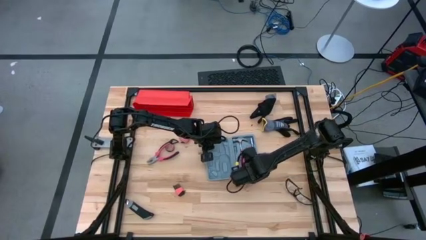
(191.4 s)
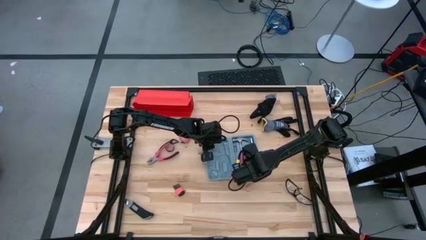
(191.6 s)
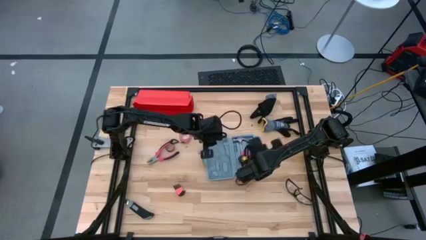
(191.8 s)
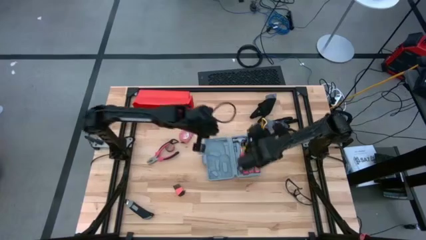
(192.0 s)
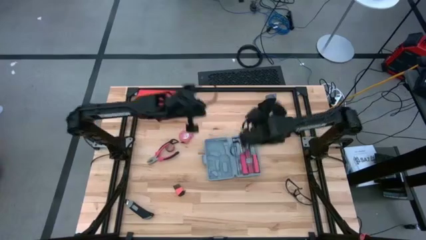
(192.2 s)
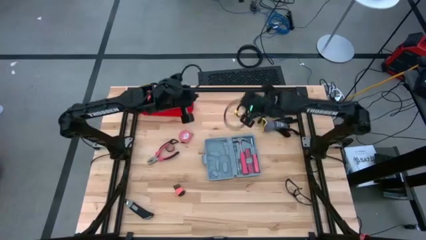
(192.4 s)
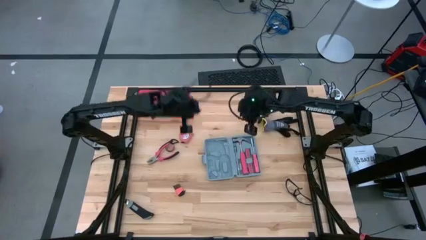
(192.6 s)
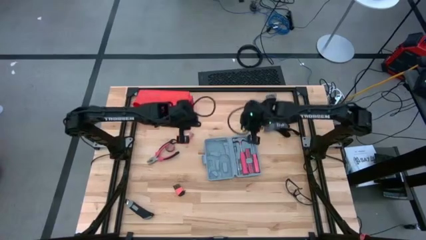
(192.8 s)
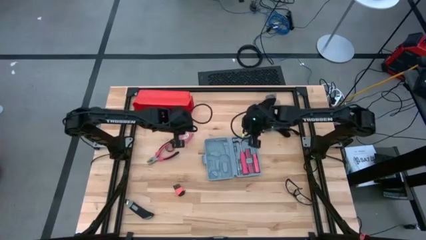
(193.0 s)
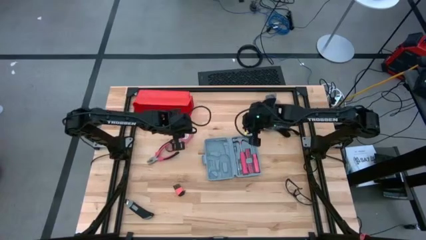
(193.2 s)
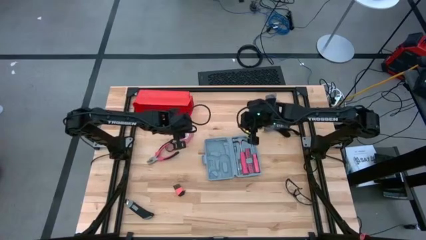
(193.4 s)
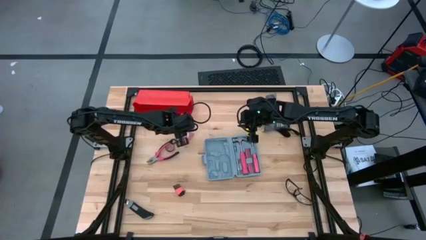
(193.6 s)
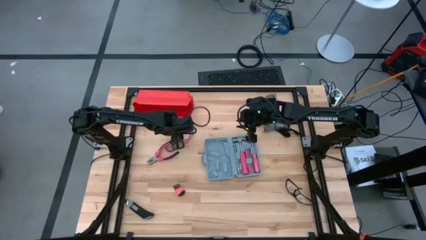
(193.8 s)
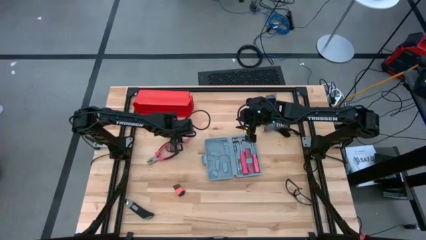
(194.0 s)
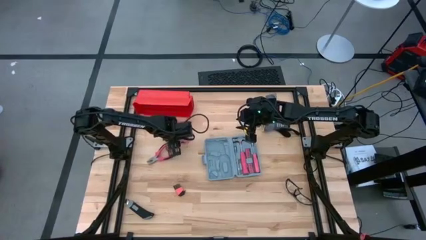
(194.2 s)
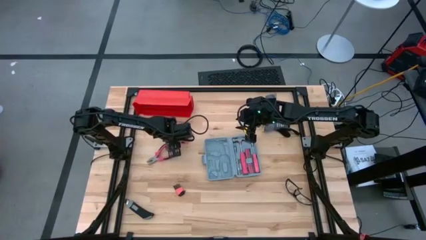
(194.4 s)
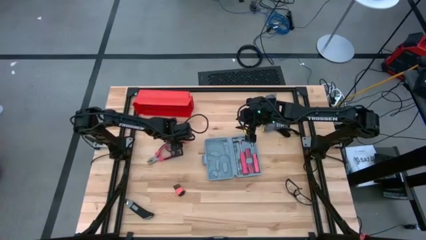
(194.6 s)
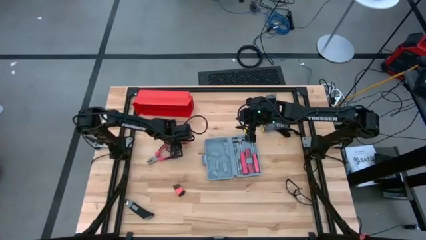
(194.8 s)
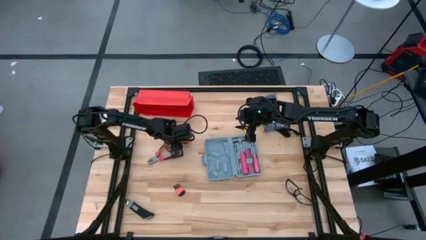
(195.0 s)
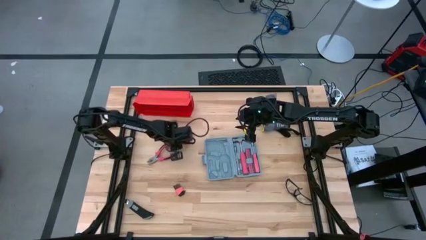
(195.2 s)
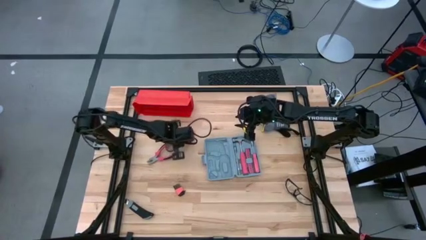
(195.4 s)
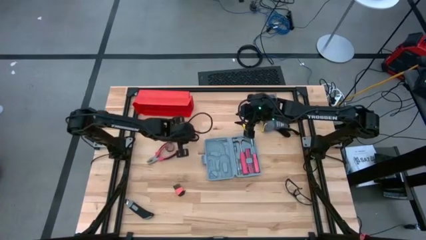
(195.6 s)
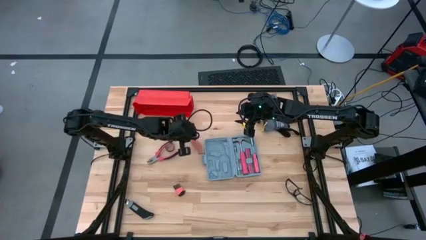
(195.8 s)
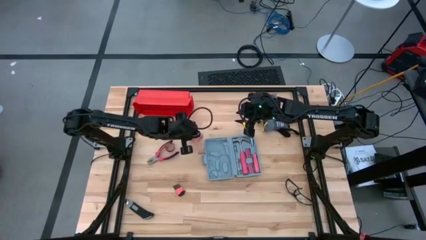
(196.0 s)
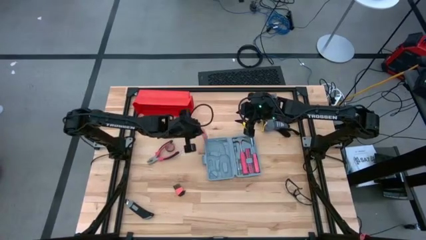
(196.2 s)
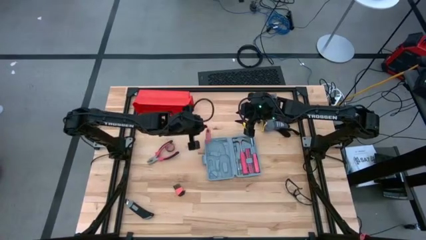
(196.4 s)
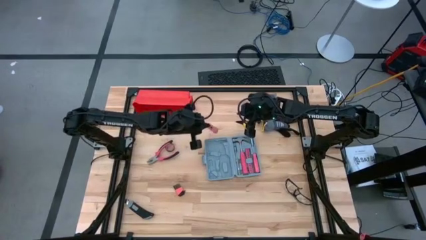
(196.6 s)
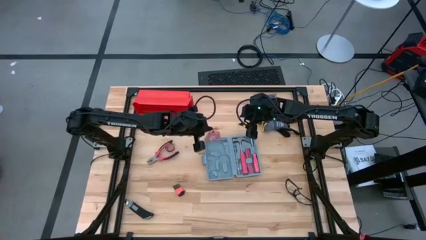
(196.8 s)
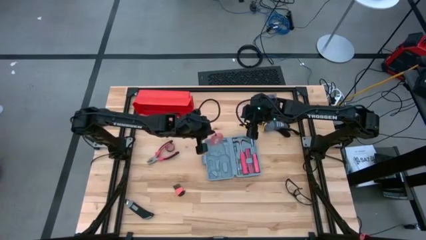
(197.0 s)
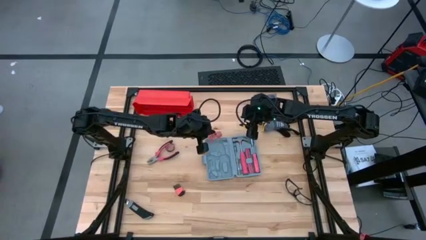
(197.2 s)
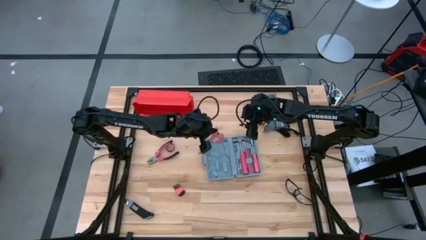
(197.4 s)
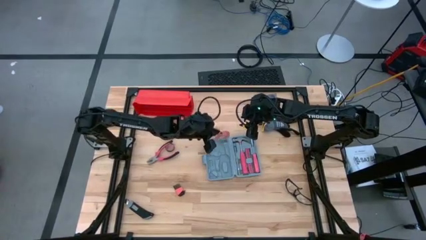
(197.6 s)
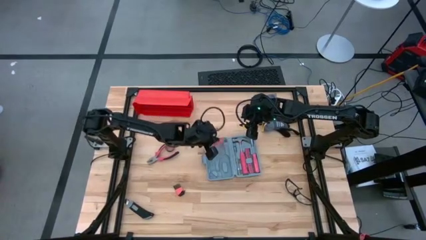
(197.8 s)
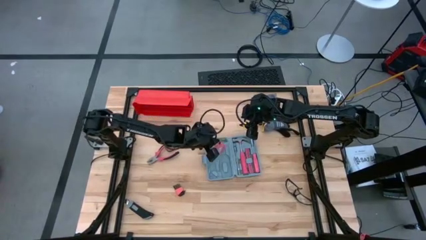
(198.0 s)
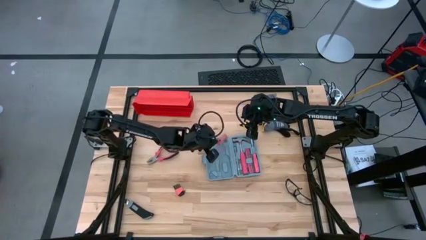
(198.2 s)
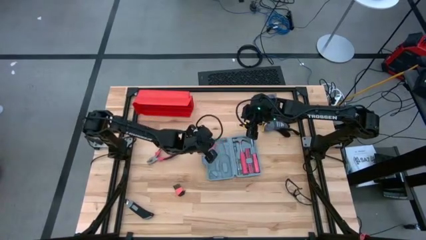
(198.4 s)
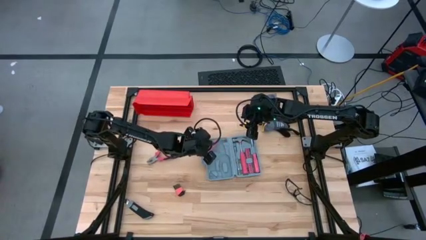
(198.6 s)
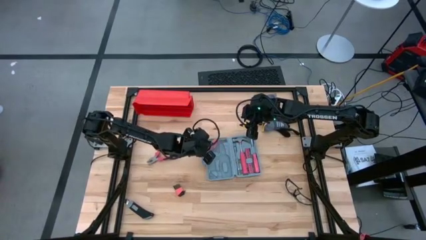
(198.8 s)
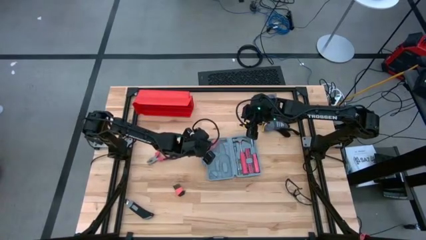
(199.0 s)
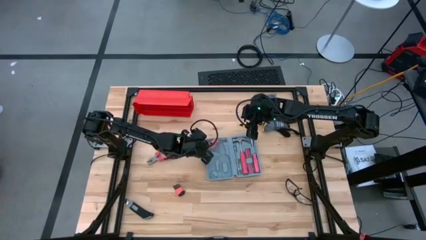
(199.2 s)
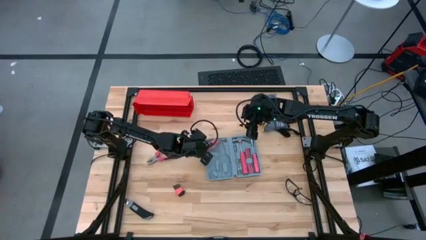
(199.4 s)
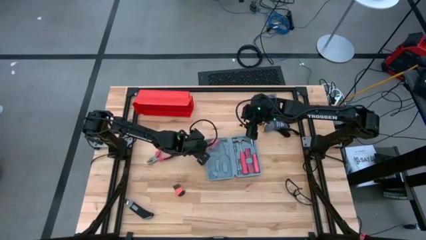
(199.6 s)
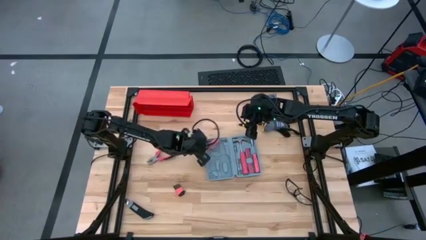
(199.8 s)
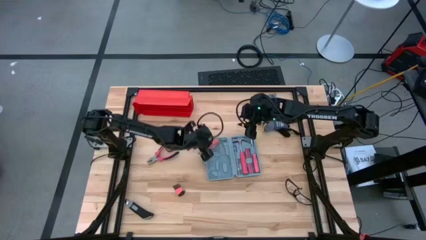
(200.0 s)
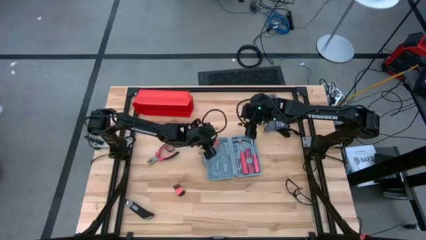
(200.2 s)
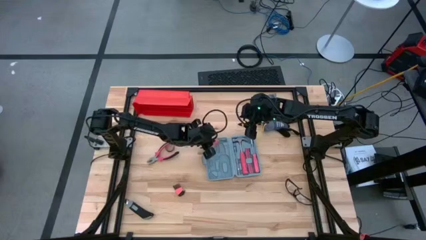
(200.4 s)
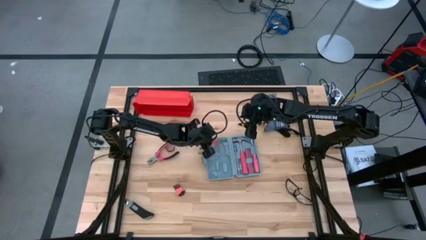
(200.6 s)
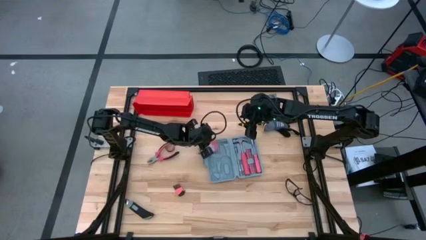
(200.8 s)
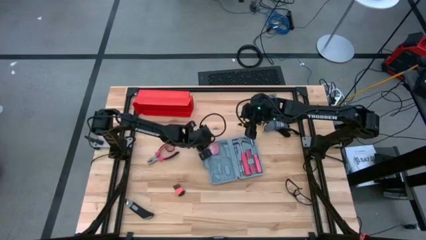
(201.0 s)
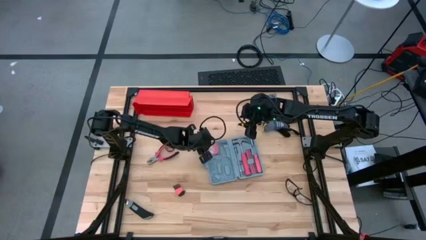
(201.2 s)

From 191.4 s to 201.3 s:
Task: prefit tool cases
Put the orange measuring tape into the gray pre-fit tool case

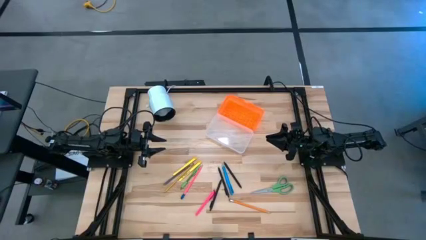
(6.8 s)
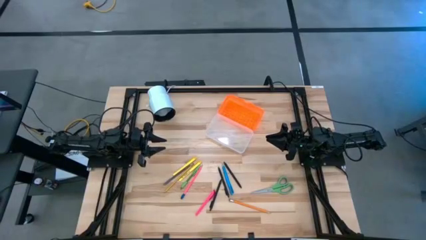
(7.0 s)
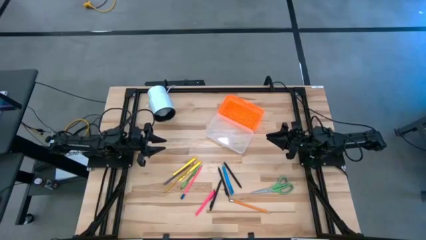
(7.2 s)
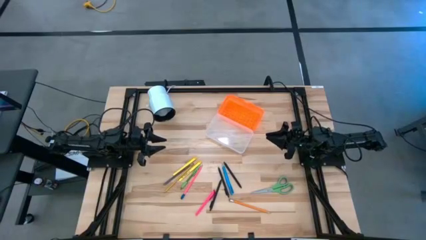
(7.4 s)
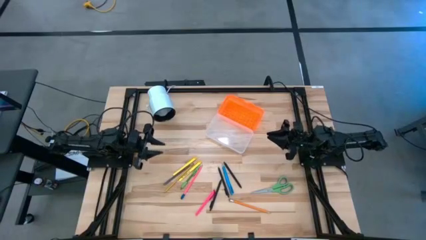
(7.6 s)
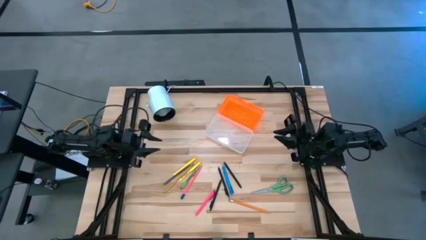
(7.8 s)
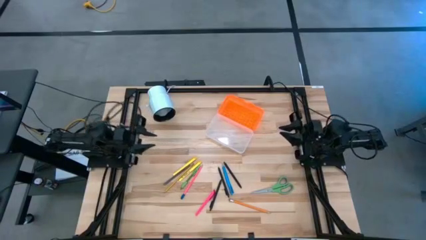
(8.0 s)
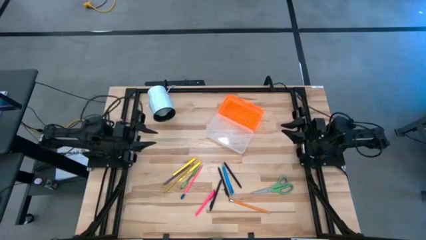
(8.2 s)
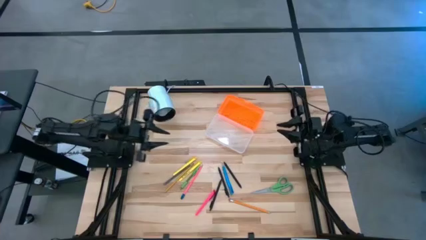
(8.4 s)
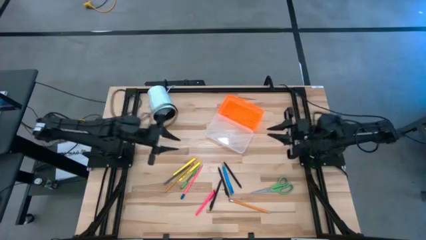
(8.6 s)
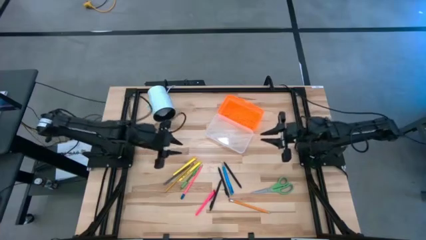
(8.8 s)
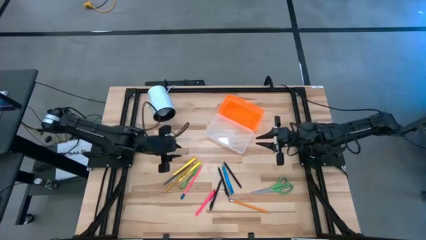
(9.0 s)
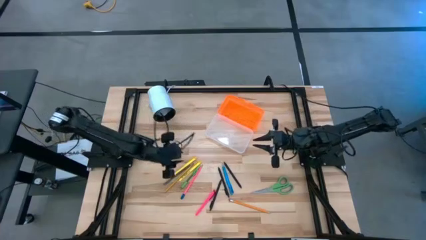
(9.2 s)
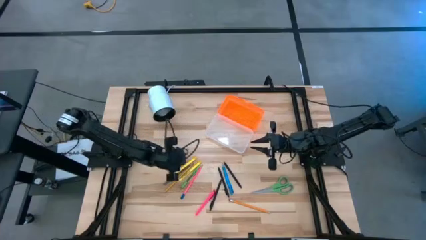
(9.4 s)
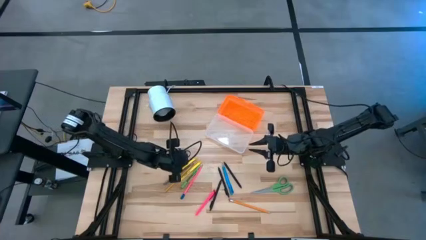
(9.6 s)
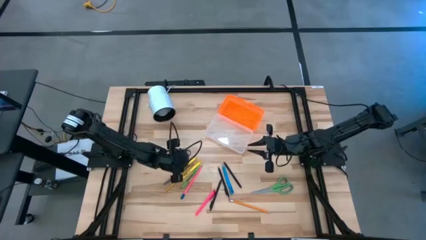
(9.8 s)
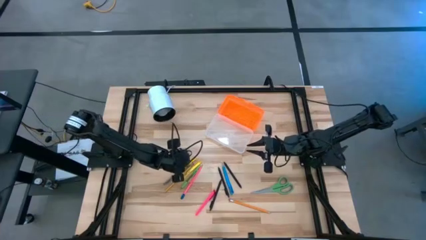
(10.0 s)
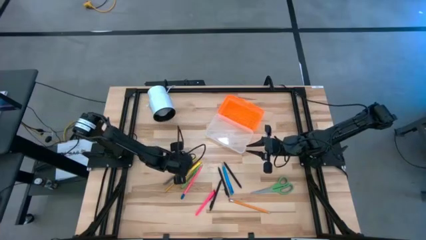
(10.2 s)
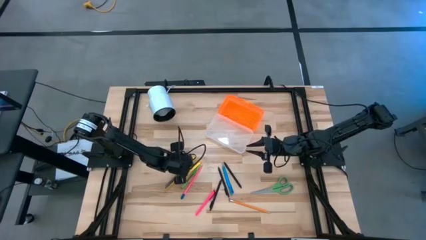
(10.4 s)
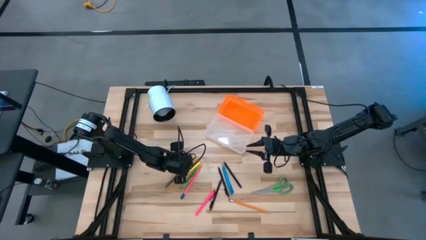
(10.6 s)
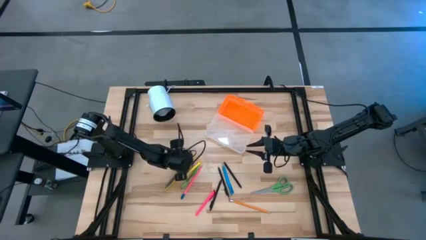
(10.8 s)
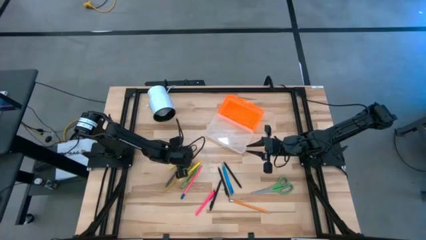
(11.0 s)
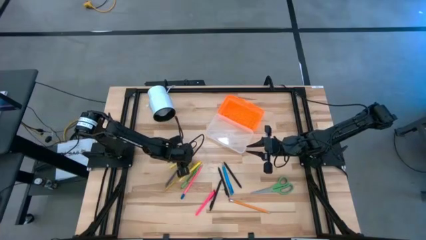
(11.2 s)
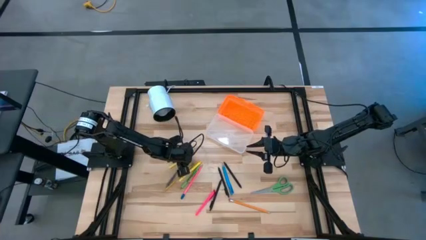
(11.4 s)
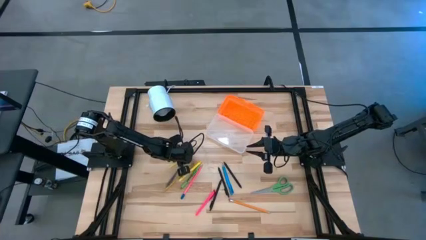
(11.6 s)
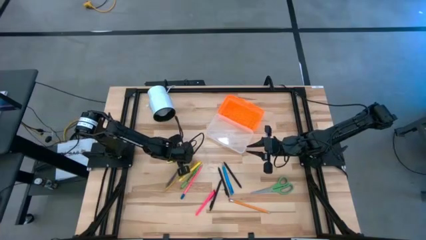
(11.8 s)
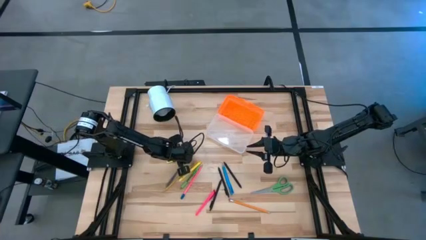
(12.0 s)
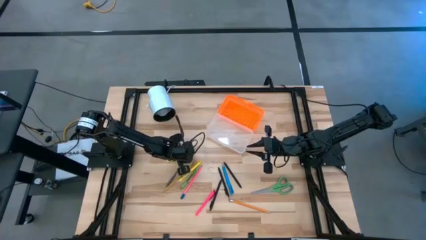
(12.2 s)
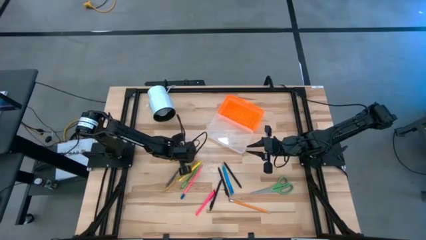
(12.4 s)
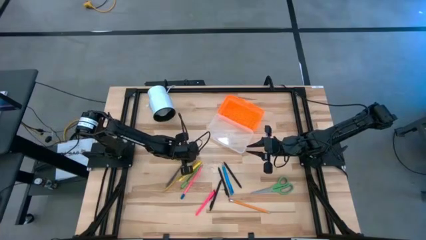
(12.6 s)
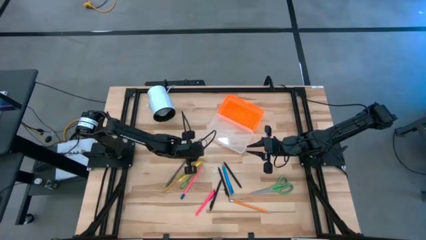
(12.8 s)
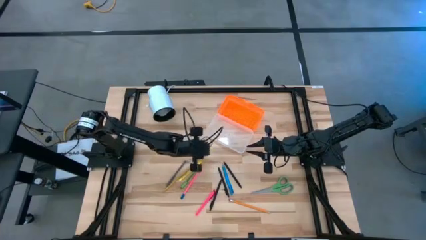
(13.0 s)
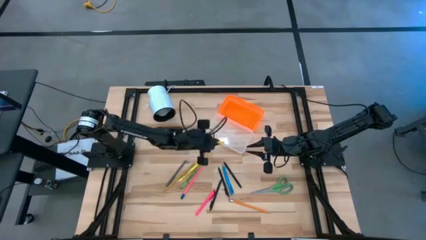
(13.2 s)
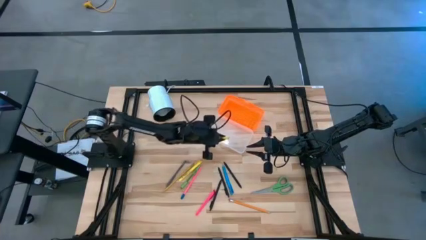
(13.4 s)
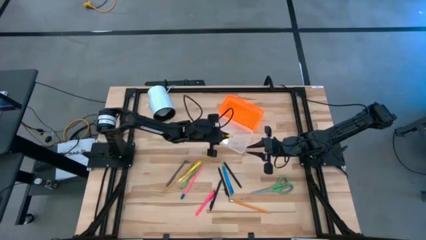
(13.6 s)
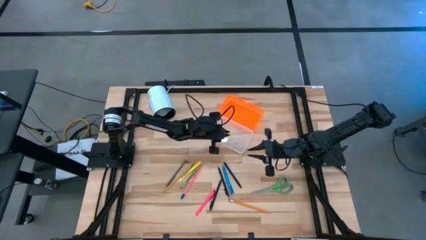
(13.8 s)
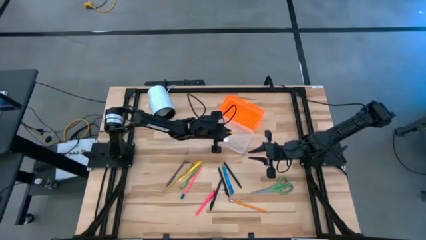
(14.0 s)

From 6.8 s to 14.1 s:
Task: Pick & place school supplies into a supply box
Put the left yellow pen into the supply box
